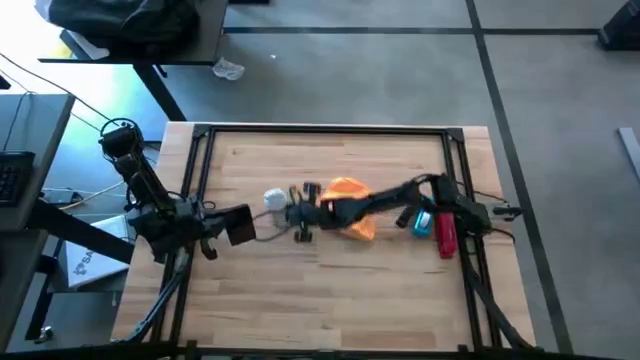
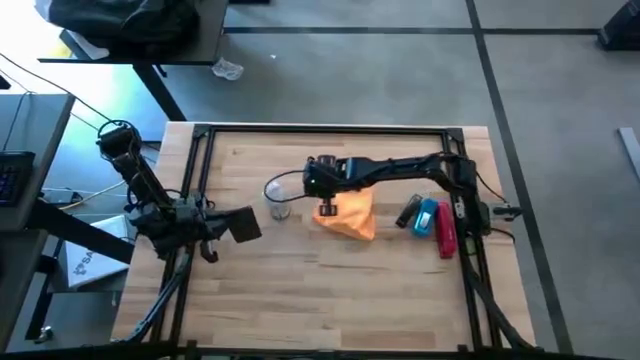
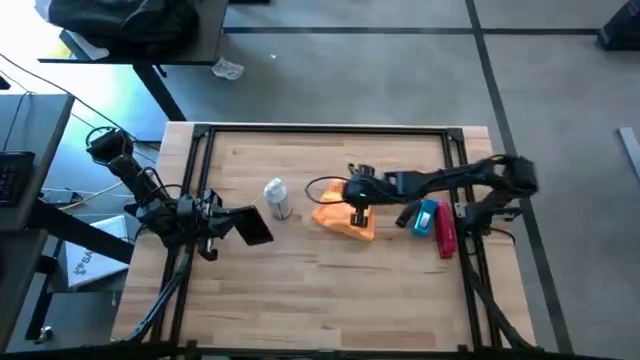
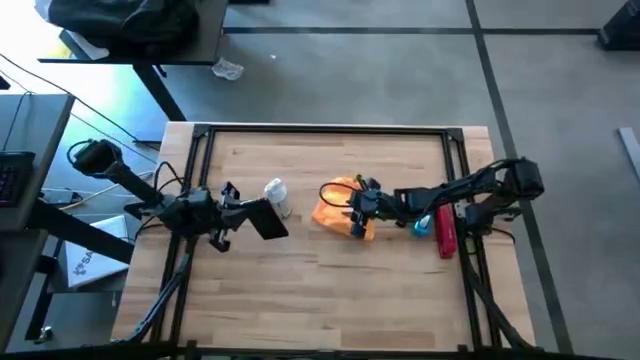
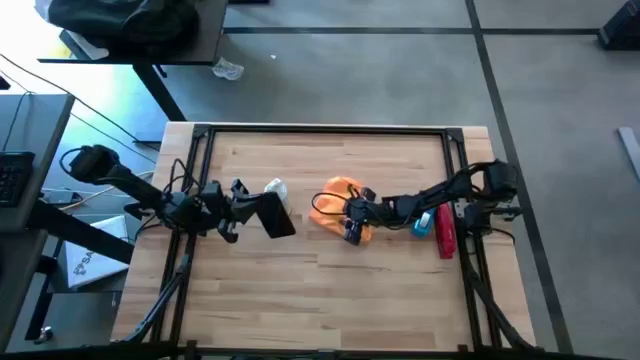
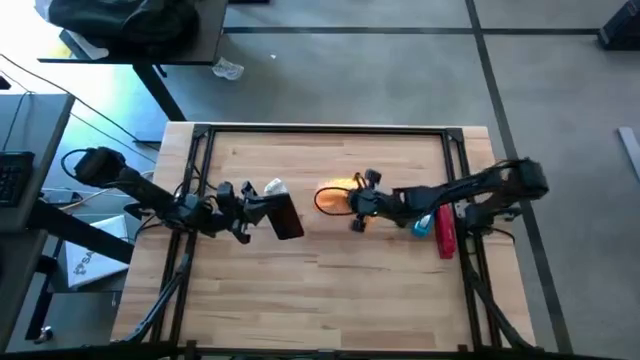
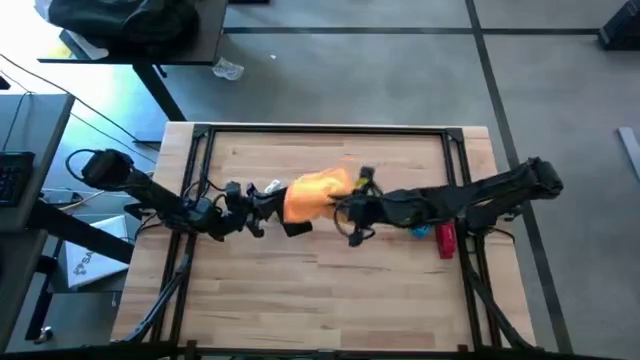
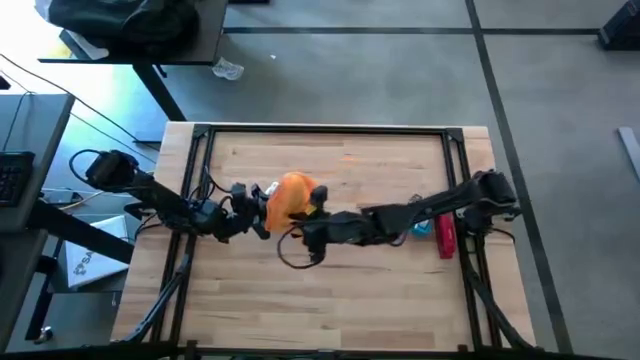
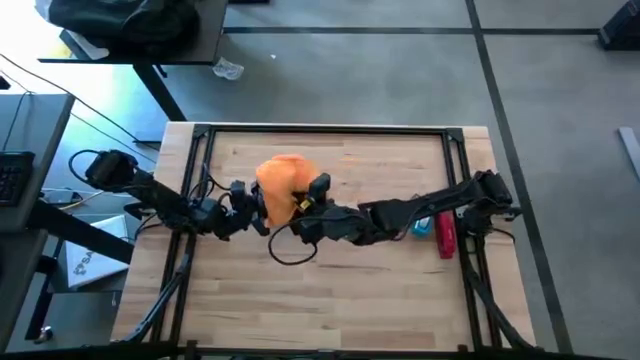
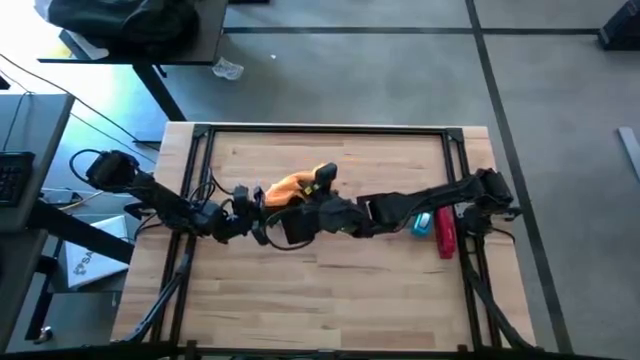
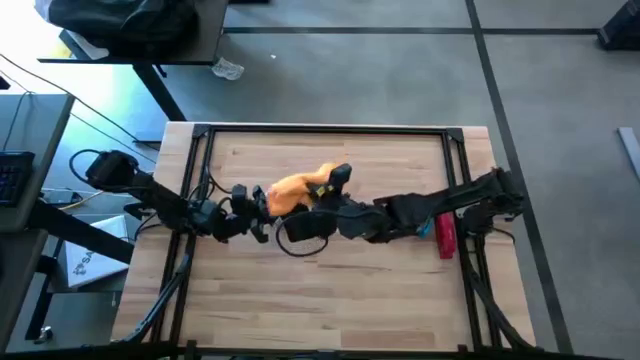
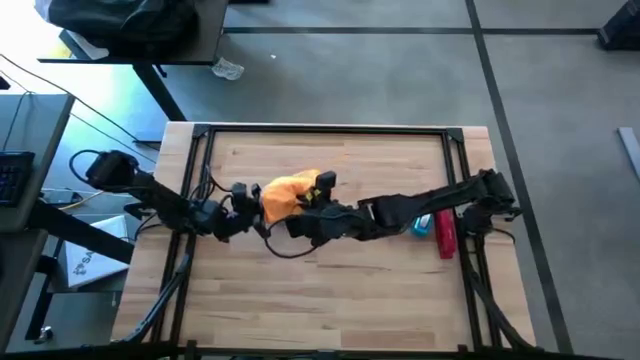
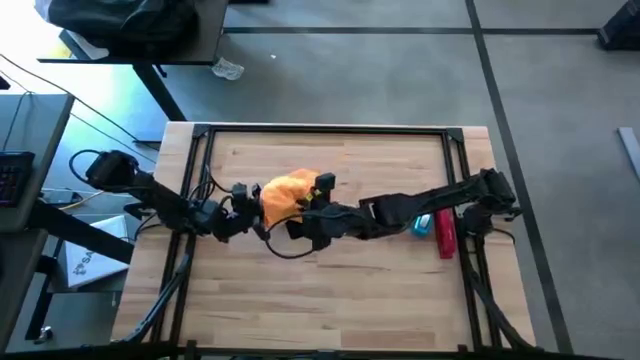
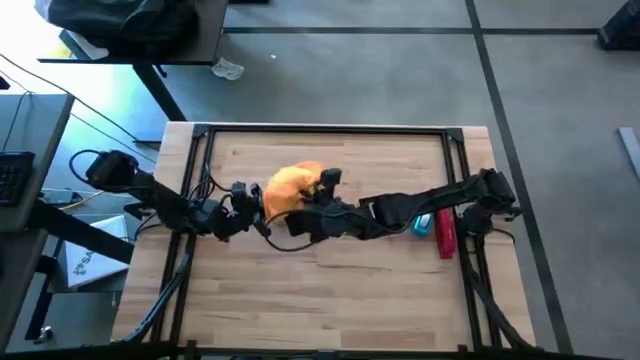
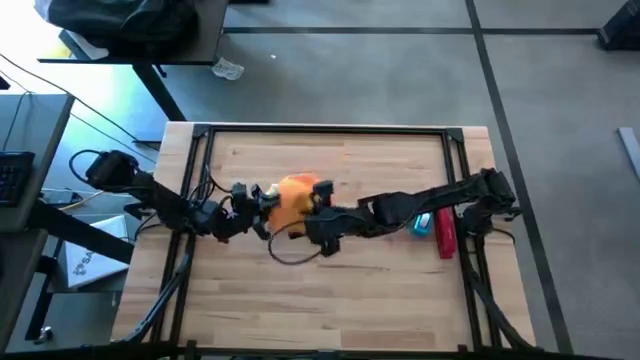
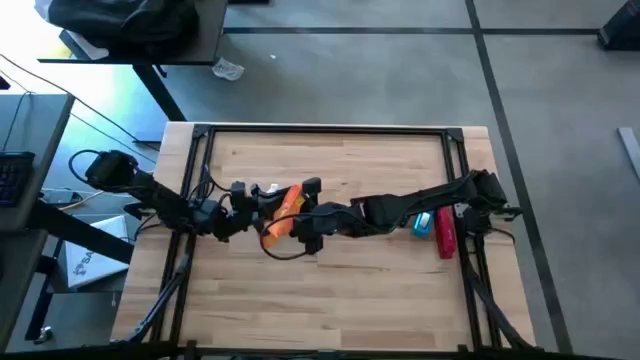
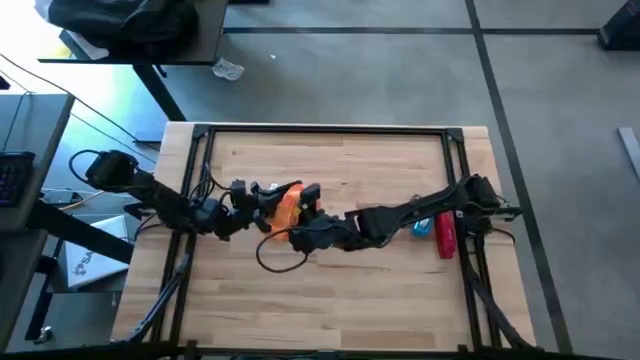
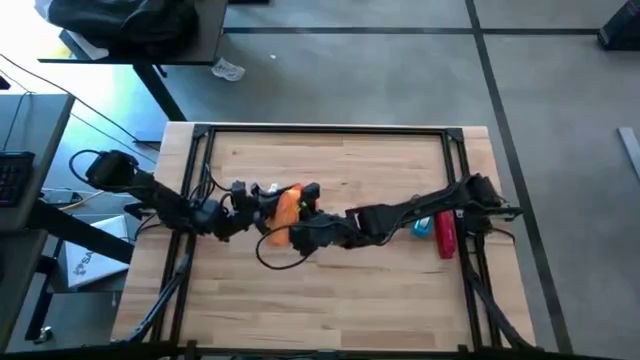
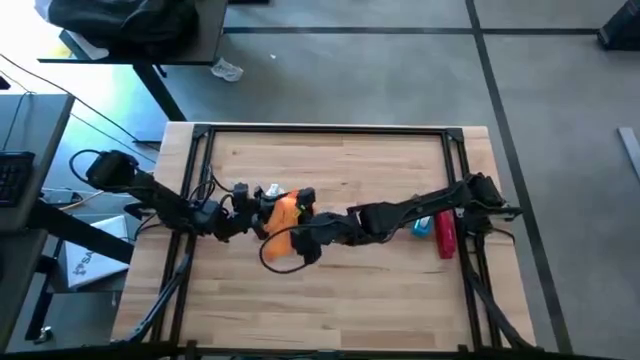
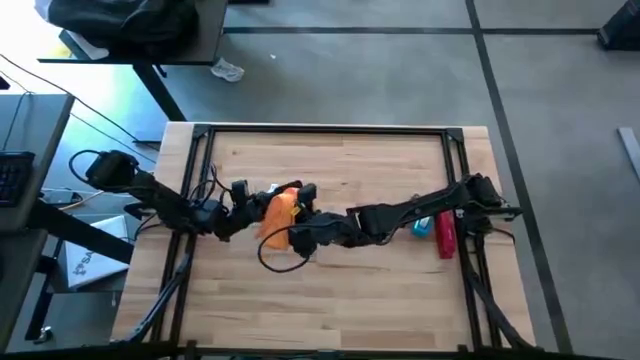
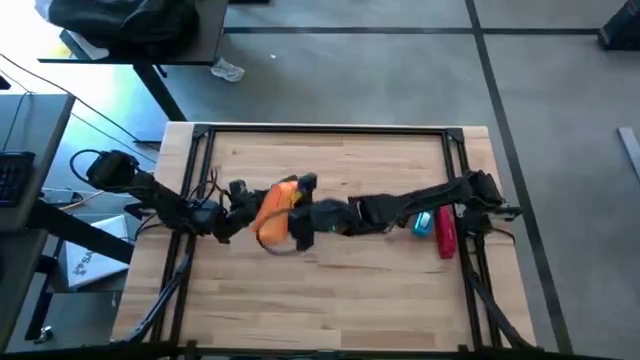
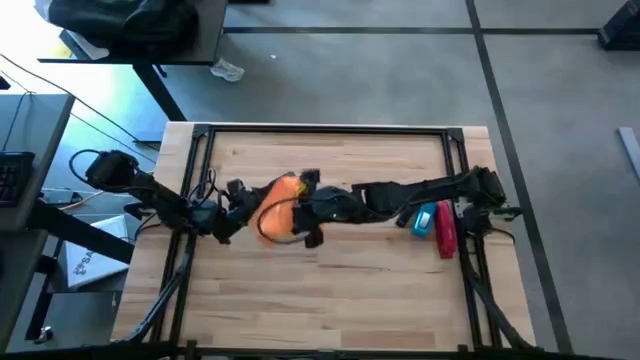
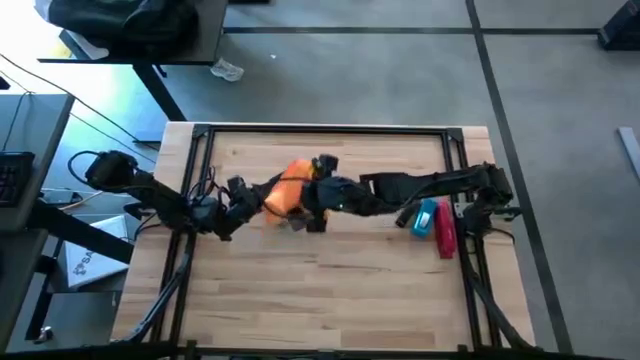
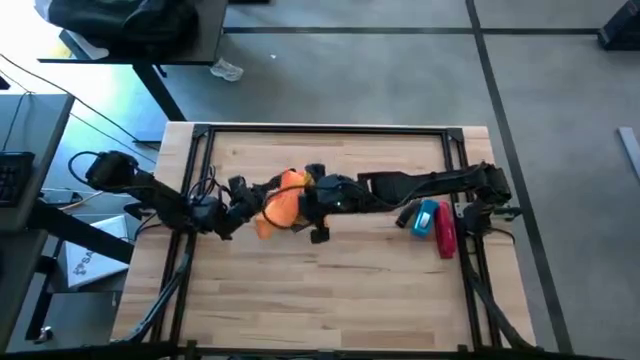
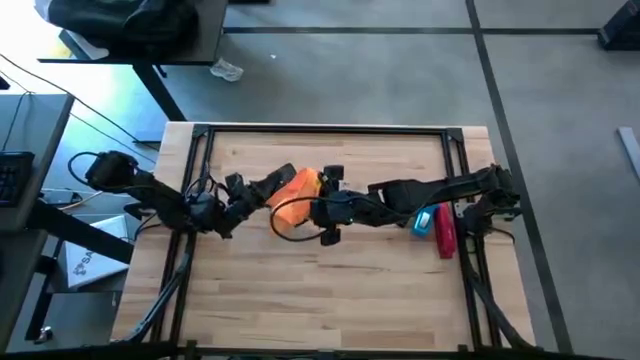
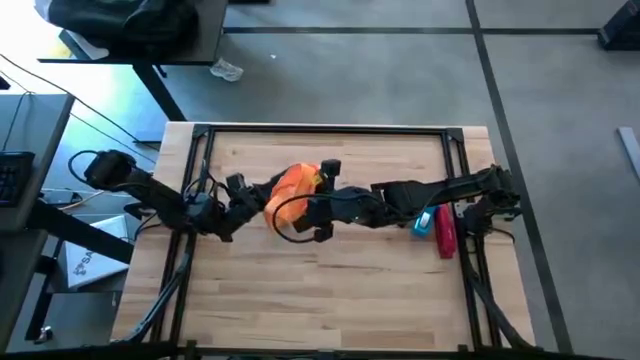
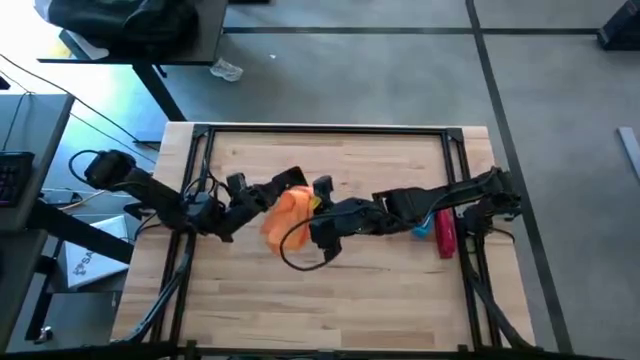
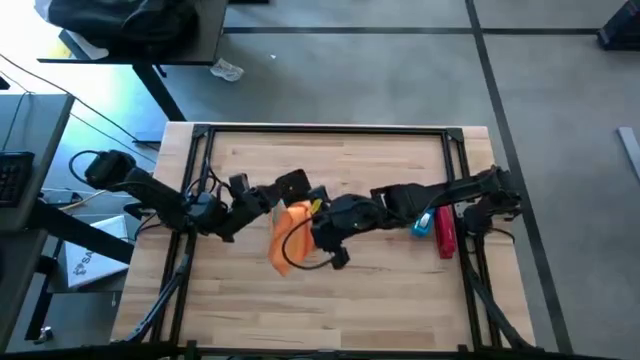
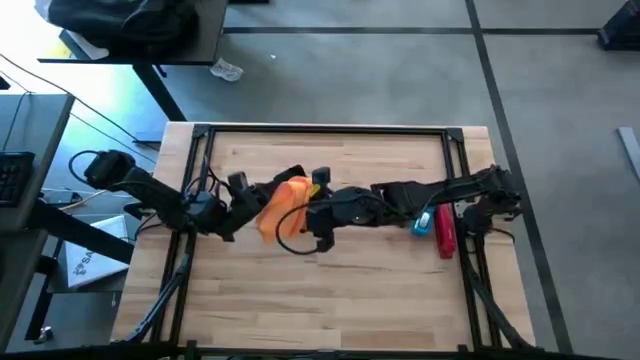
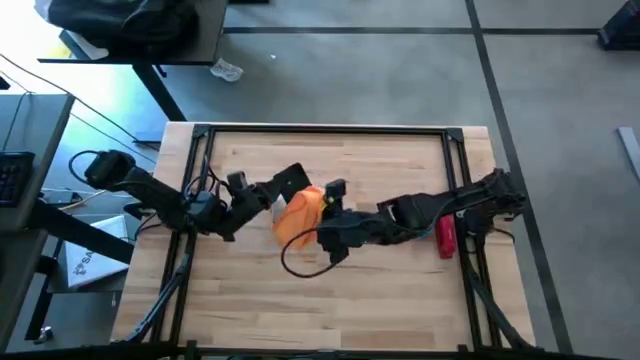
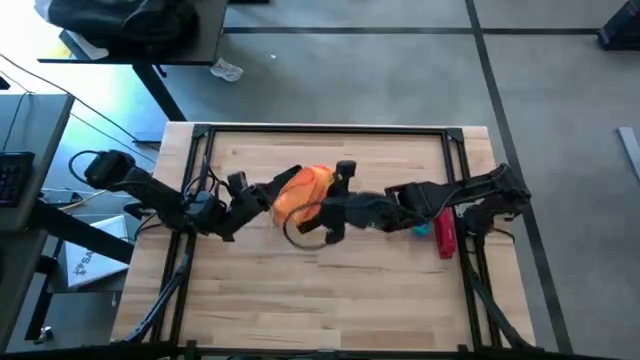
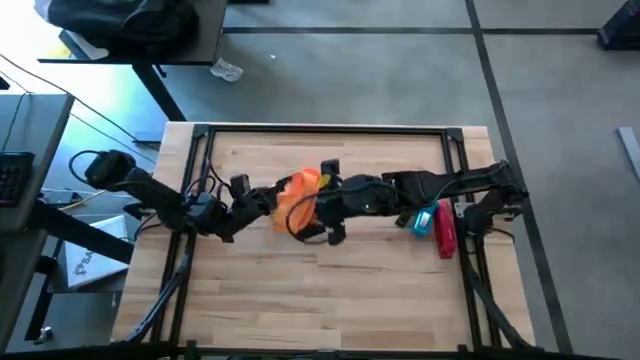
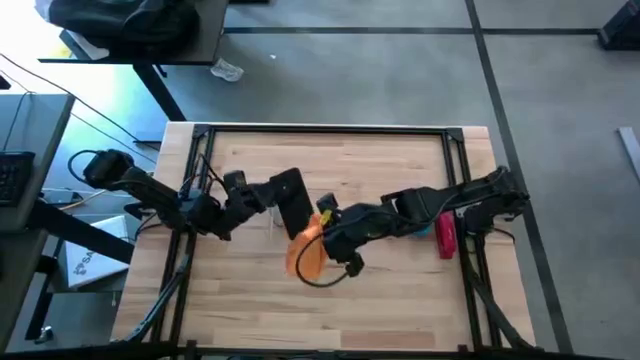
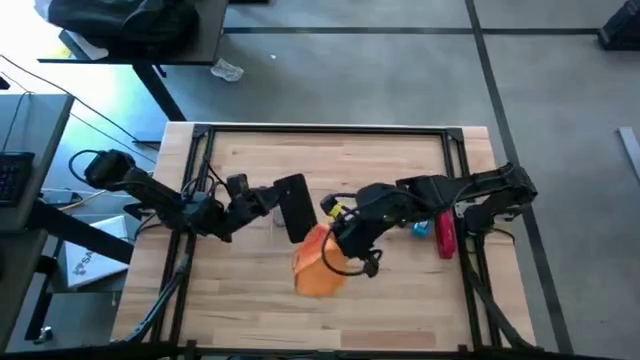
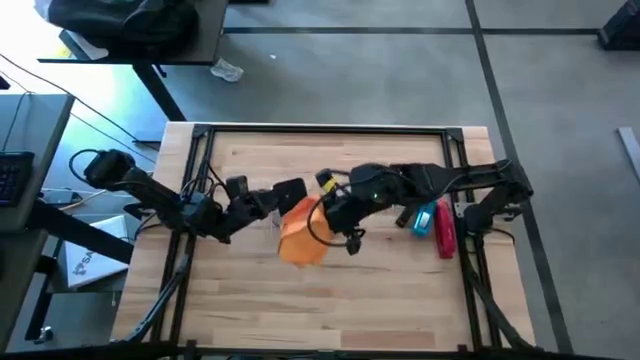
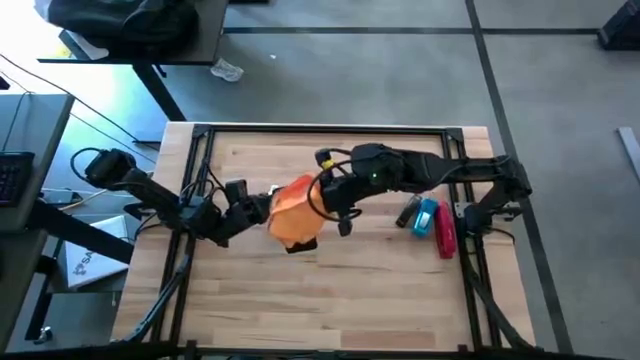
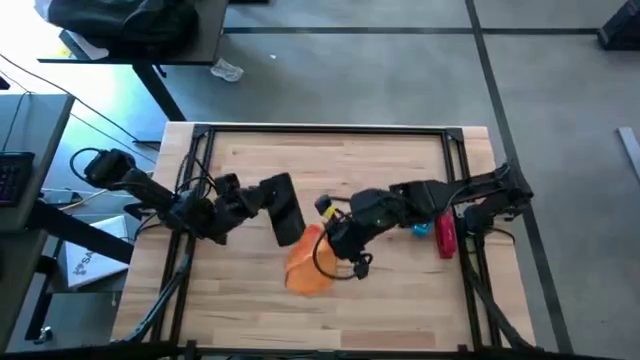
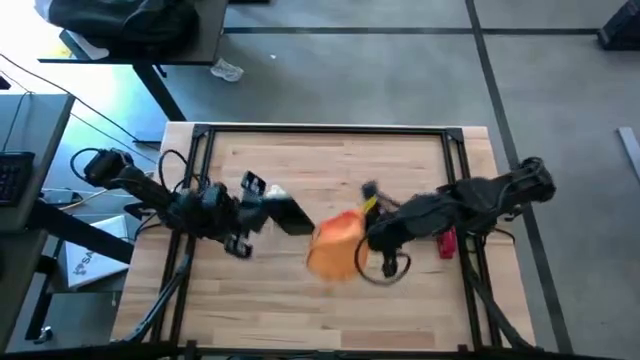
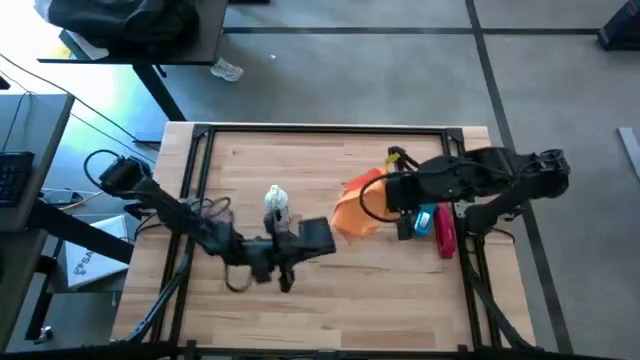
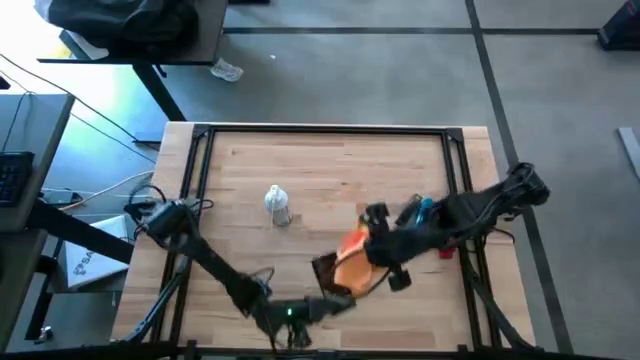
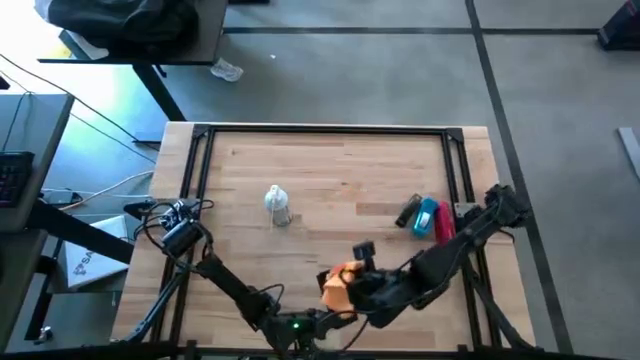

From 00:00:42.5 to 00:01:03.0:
Task: Apply microfiber cloth
Wipe the black cellphone with a microfiber cloth
